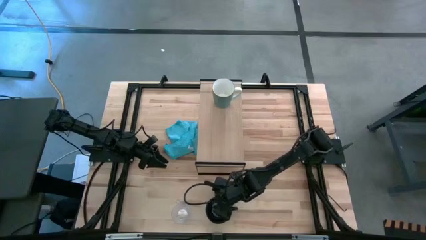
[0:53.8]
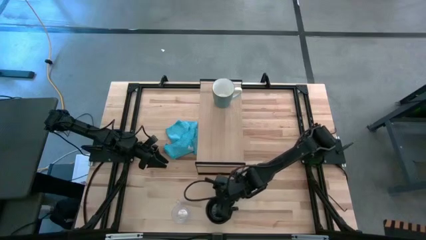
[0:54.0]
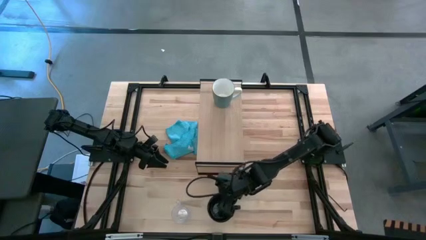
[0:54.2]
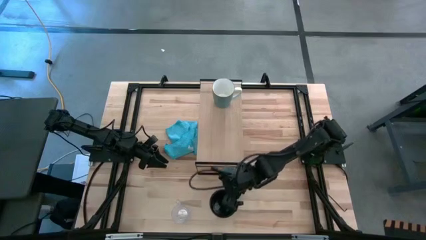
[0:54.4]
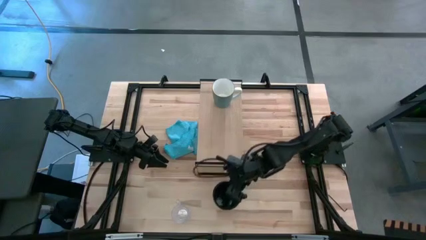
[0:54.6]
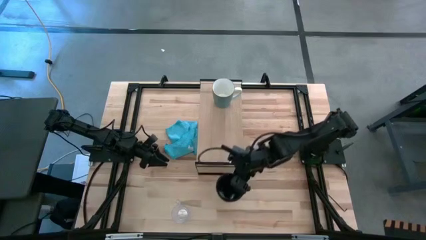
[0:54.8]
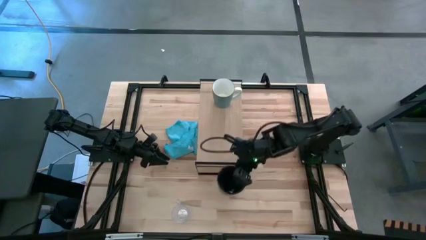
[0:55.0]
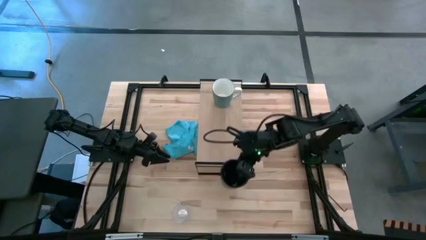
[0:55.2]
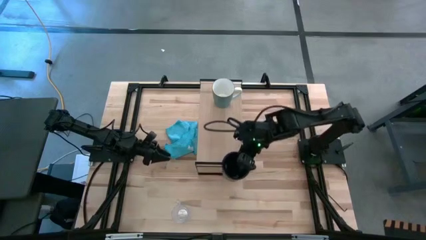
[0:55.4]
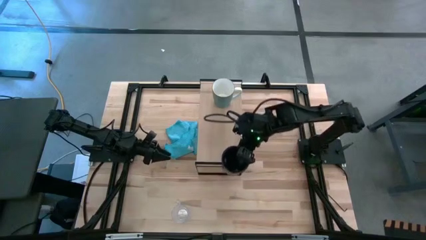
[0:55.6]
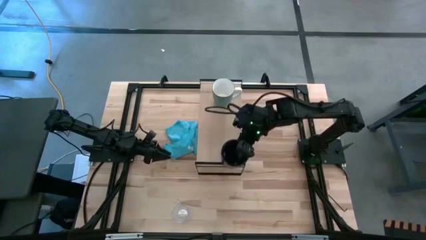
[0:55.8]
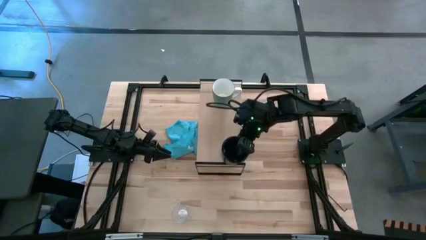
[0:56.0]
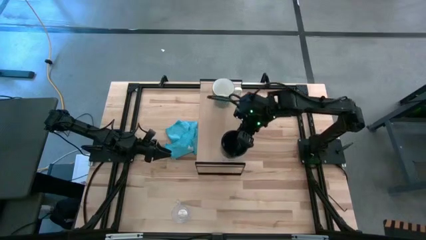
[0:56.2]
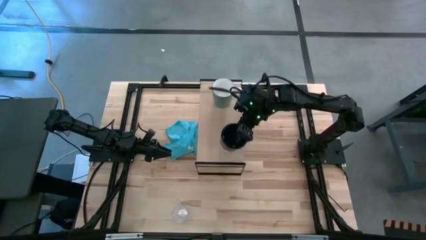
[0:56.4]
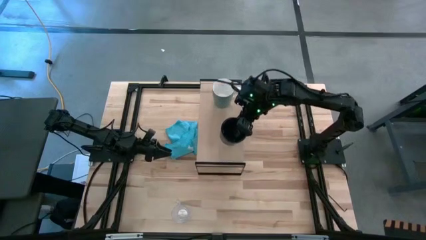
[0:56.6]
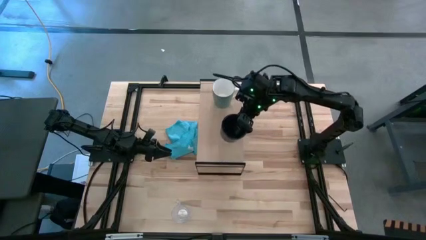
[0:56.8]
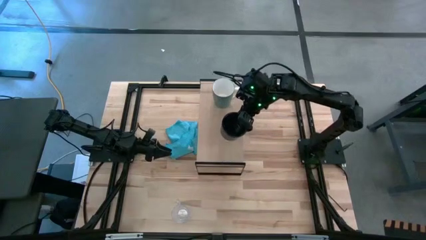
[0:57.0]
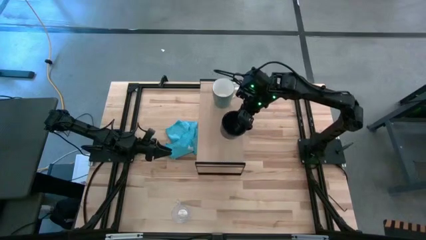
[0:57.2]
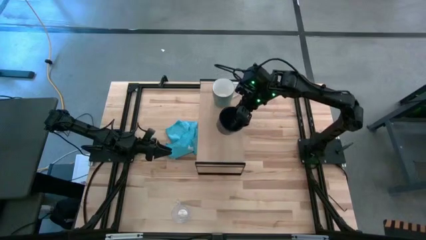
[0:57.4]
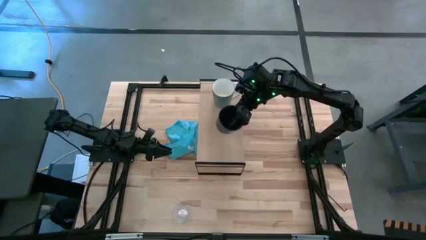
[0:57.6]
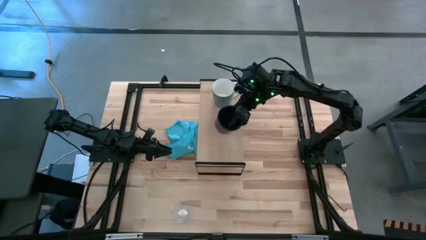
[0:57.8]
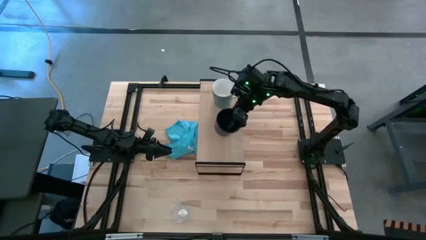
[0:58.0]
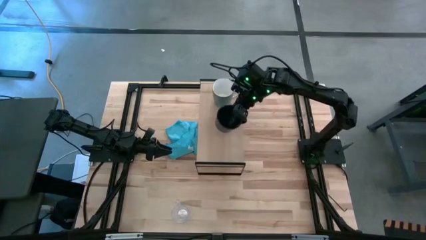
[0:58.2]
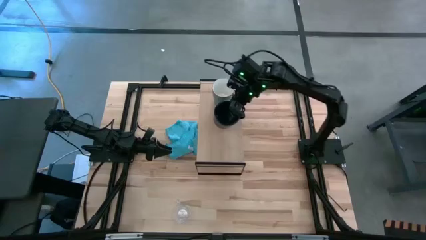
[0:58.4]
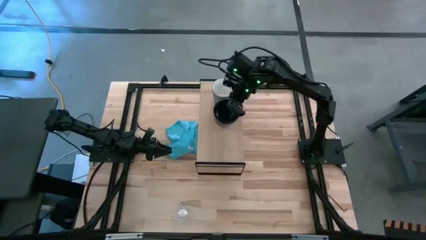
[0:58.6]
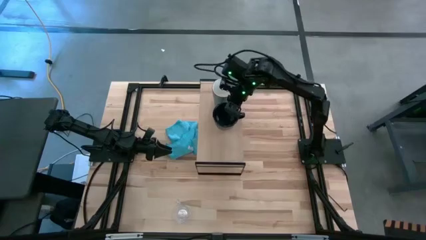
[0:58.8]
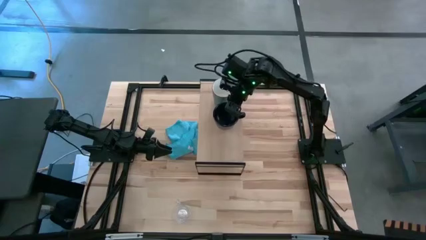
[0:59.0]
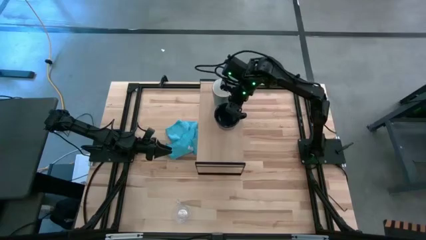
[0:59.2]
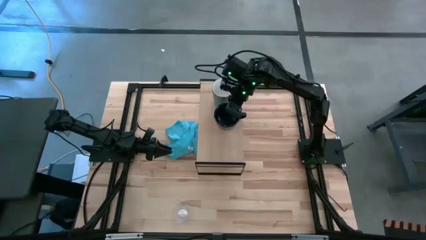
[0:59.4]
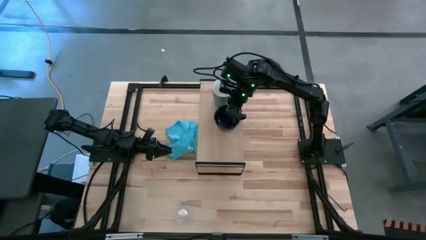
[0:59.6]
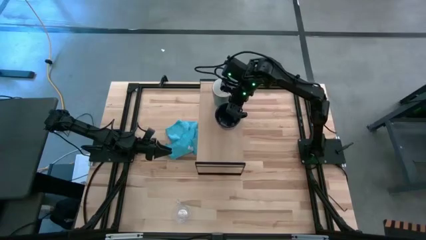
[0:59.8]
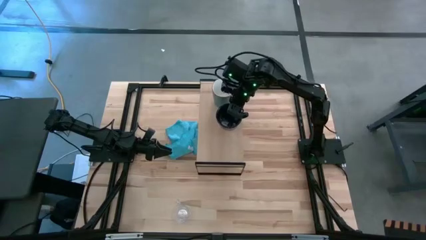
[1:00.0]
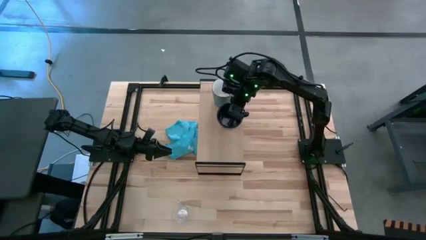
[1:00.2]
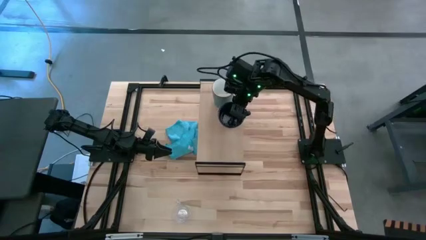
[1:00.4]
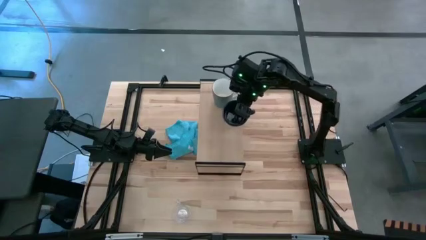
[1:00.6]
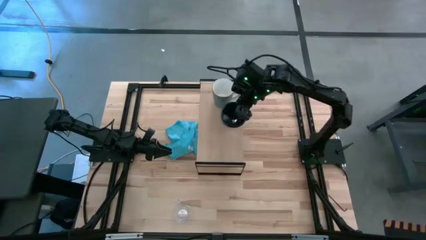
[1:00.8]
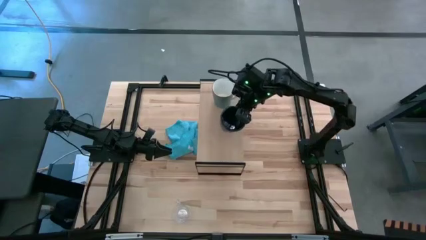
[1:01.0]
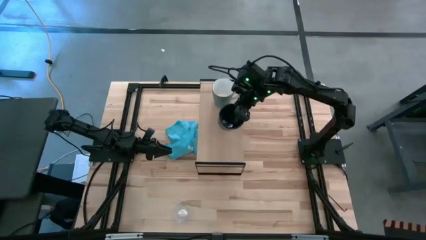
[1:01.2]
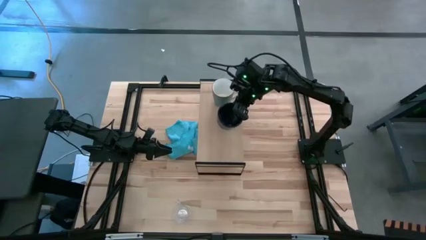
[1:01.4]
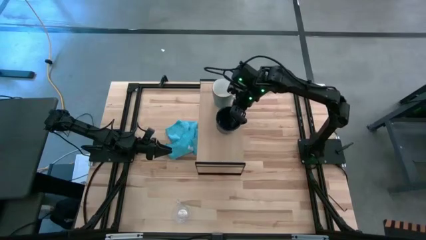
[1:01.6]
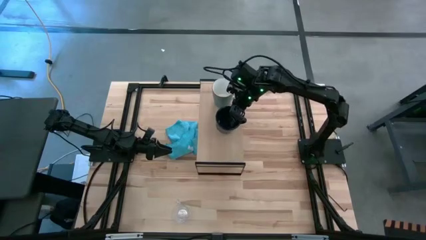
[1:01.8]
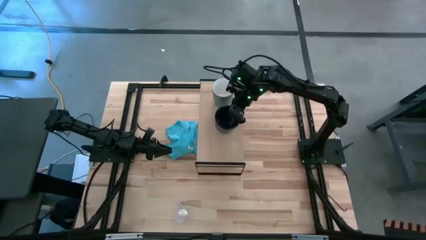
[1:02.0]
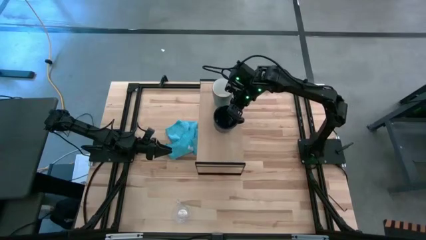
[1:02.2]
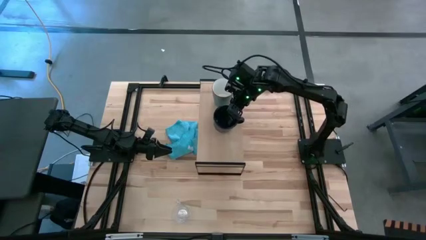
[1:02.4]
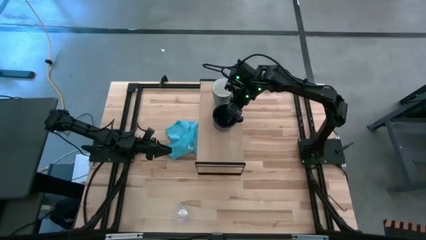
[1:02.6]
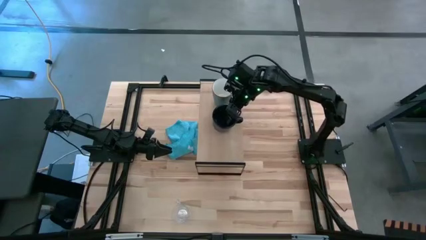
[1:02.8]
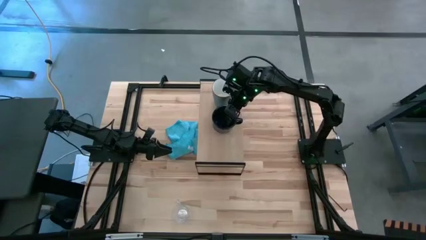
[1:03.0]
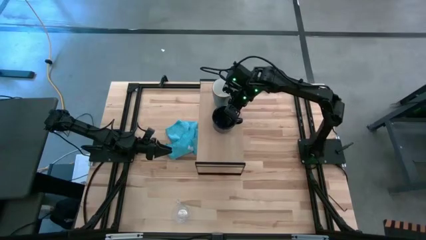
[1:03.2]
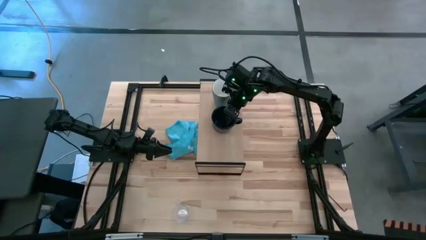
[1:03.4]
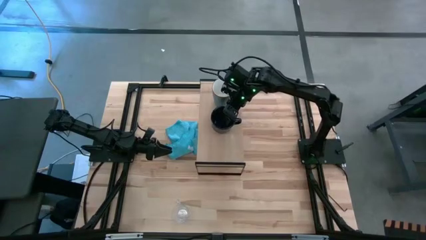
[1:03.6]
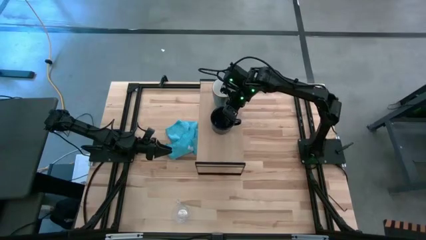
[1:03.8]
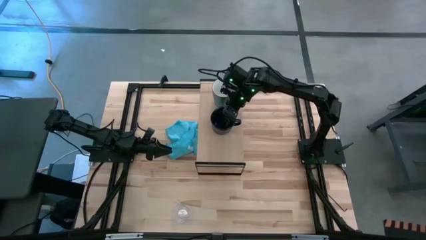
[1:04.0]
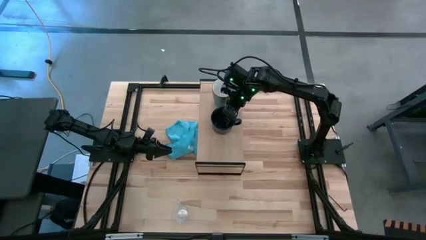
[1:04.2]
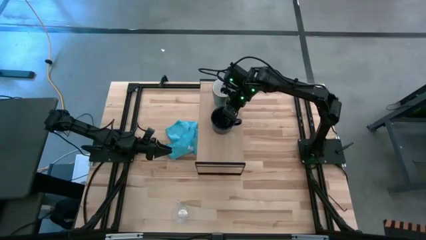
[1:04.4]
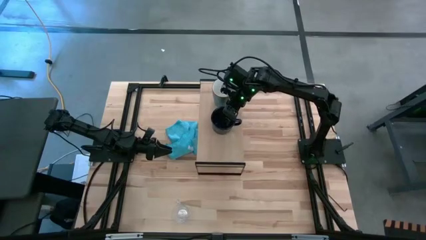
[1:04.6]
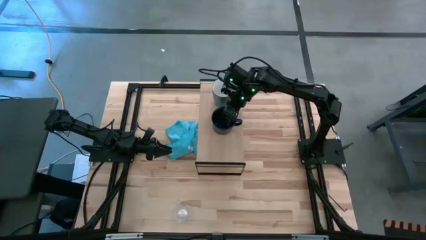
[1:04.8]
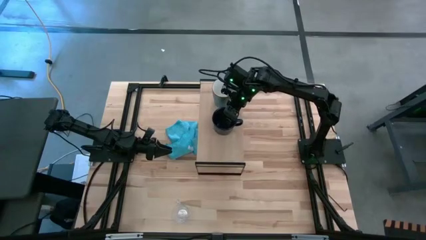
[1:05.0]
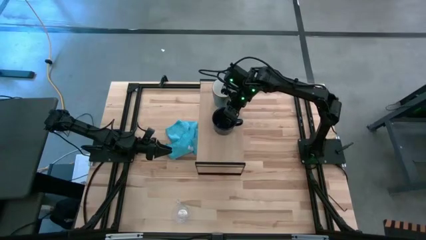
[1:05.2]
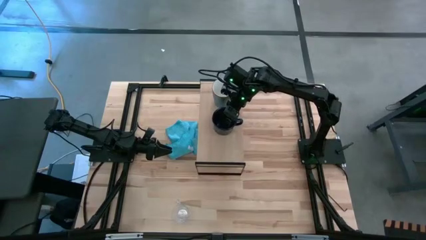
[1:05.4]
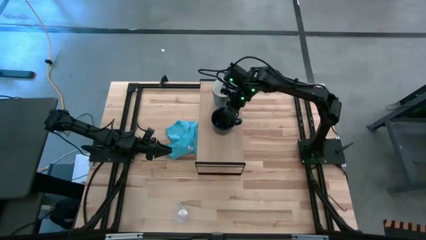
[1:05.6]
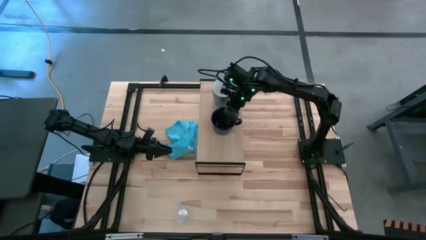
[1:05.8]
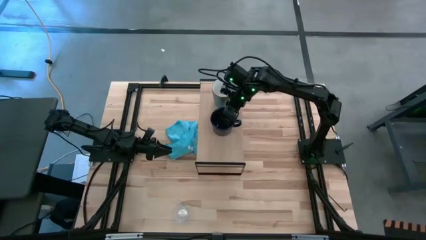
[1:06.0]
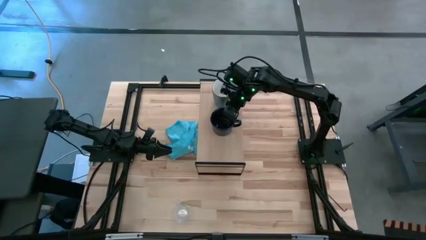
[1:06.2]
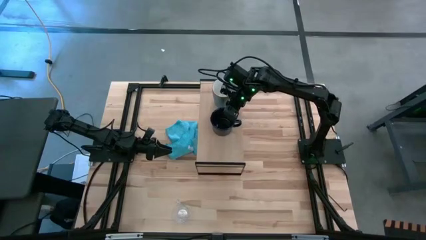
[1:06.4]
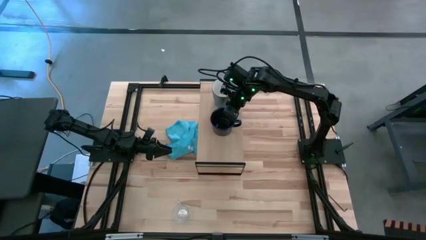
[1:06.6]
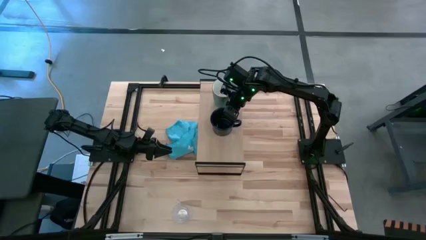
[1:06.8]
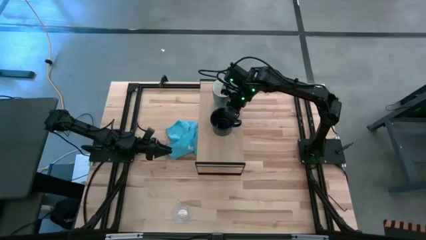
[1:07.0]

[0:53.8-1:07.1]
Task: Stack small to large cups/mugs on shelf
Put the black mug on the shelf
